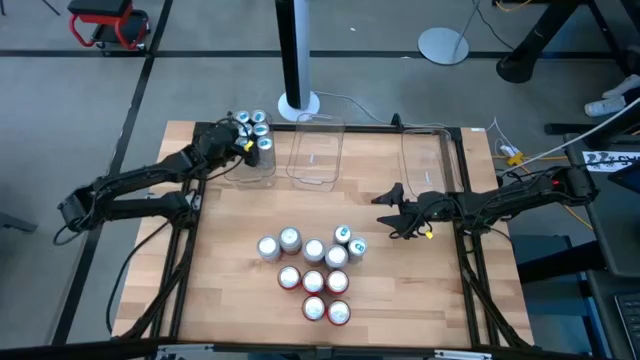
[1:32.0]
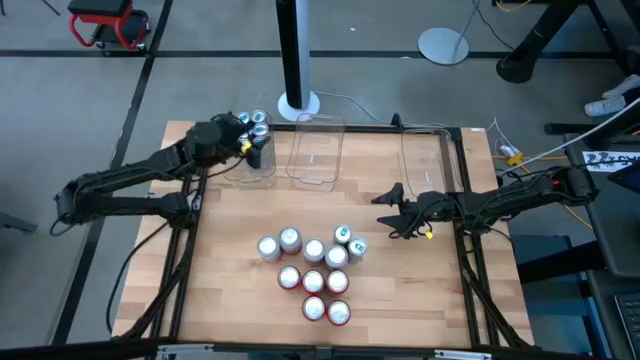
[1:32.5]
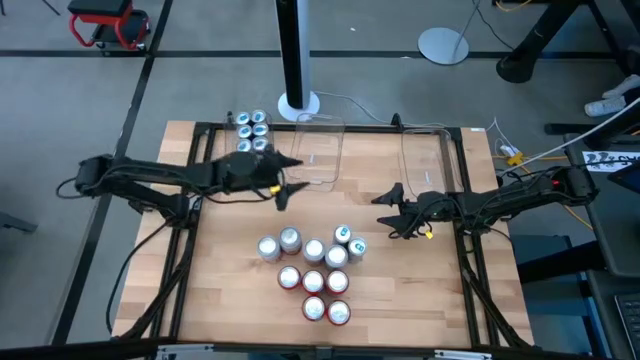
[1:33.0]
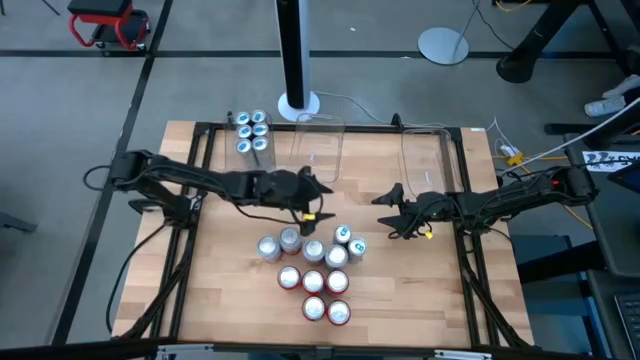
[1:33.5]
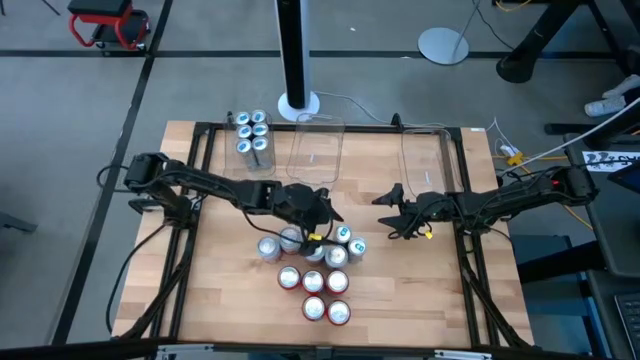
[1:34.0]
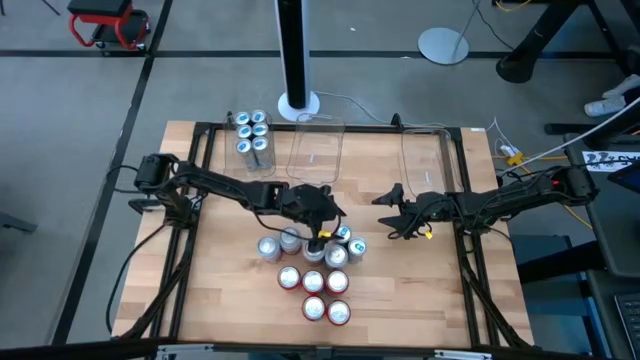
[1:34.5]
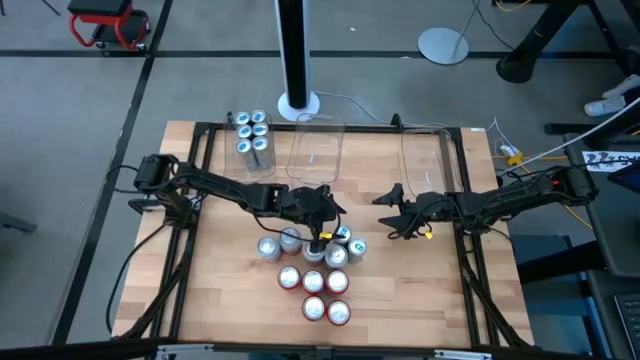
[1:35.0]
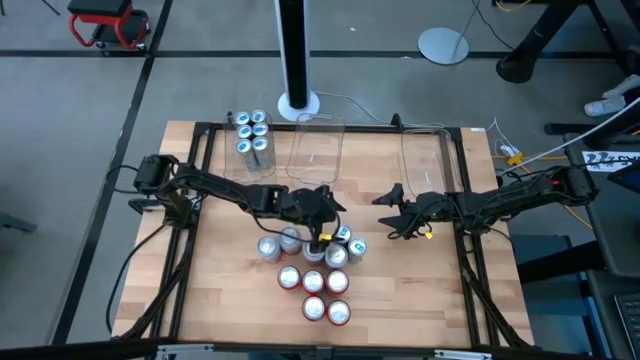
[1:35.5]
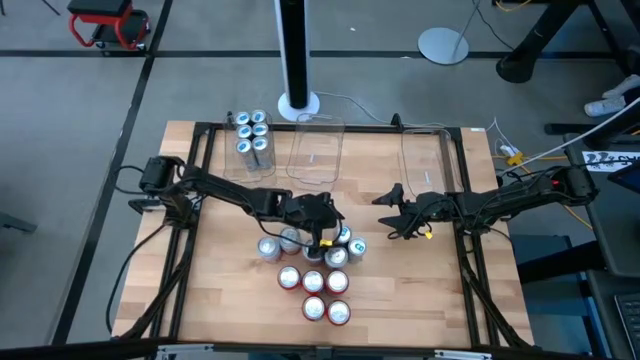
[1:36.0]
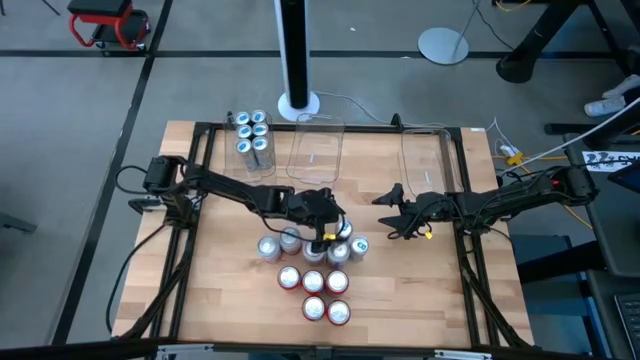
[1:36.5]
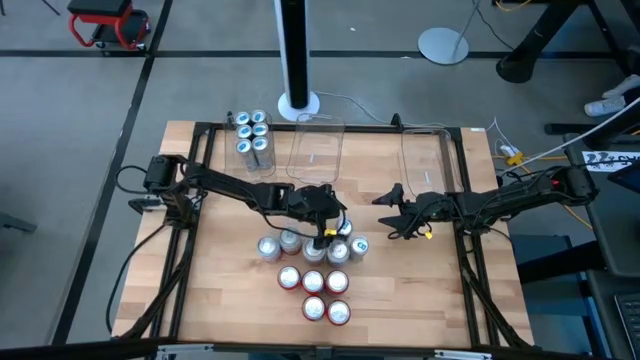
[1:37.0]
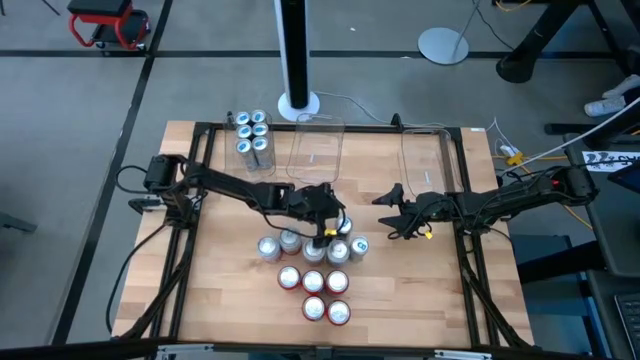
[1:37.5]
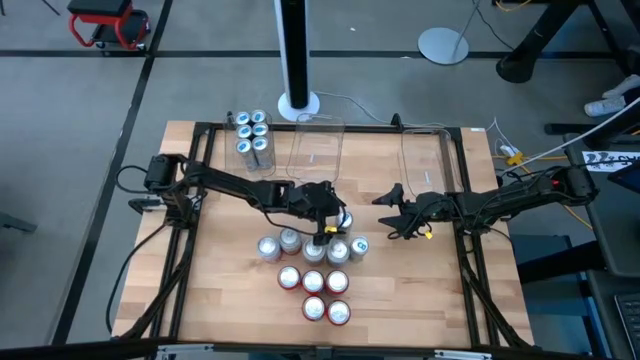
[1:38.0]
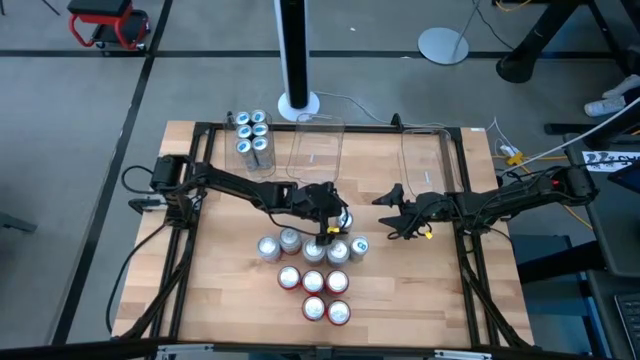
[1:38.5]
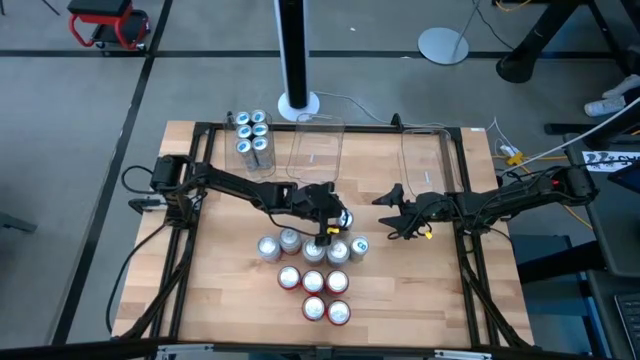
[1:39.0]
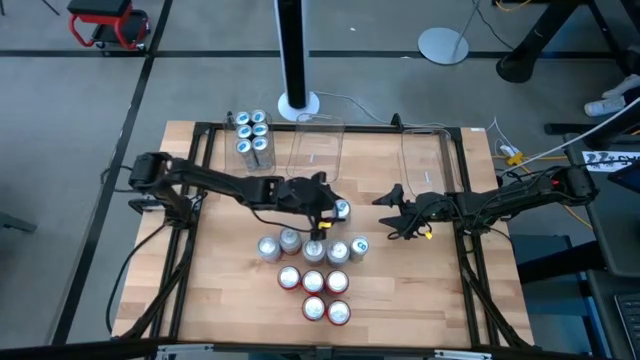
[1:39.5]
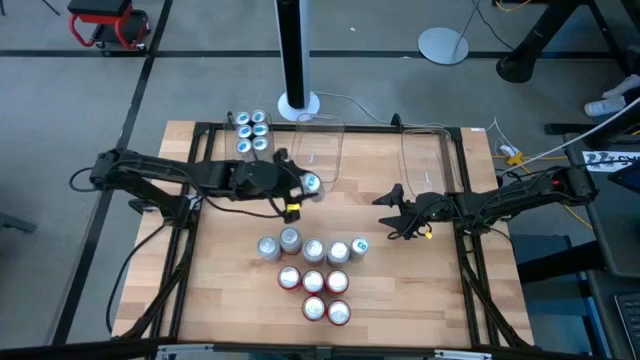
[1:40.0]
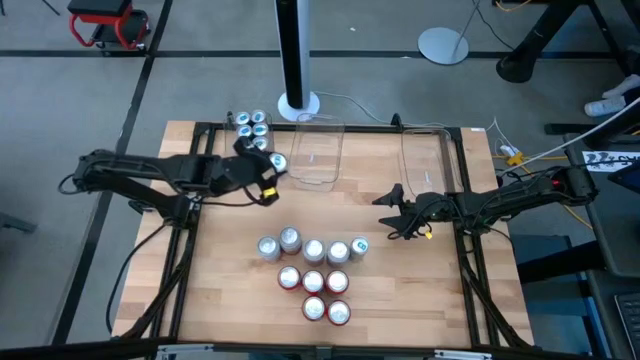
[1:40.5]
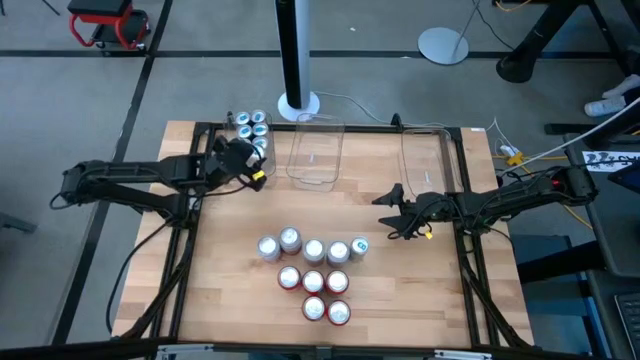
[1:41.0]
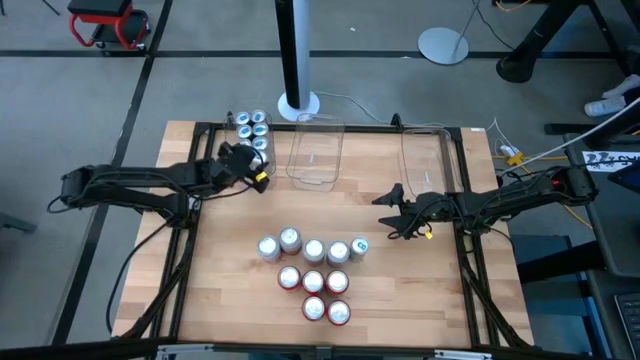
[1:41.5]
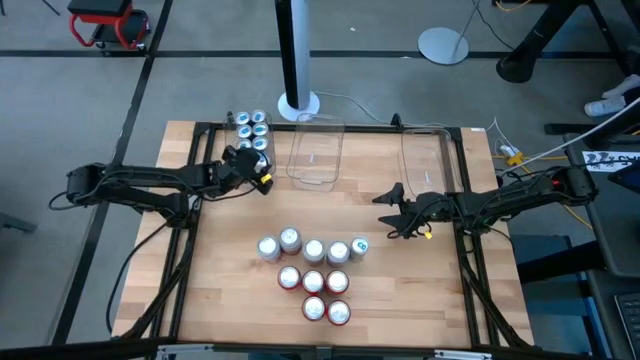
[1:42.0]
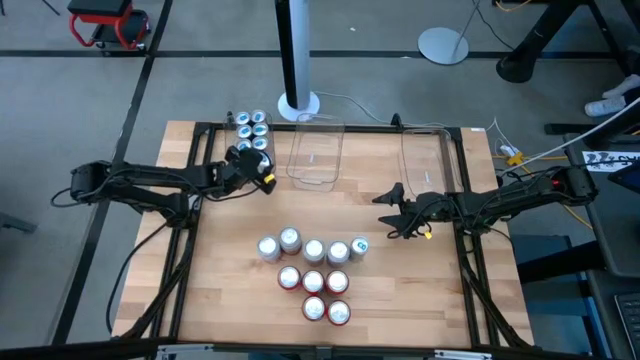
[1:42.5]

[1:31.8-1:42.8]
Task: Sort soda cans
Put the blue soda can into the left transparent bin

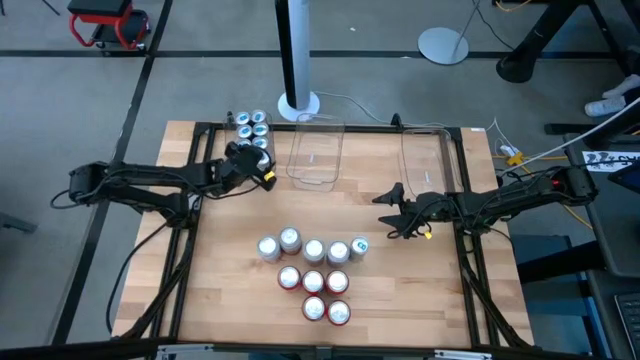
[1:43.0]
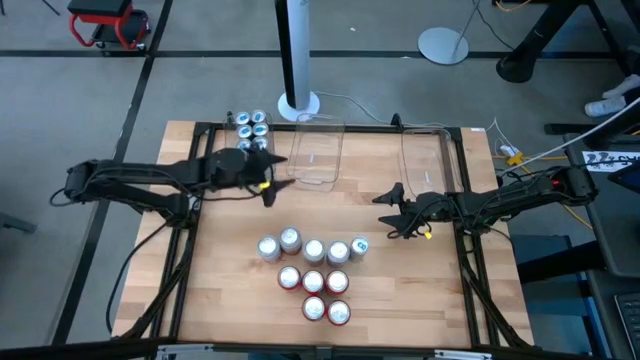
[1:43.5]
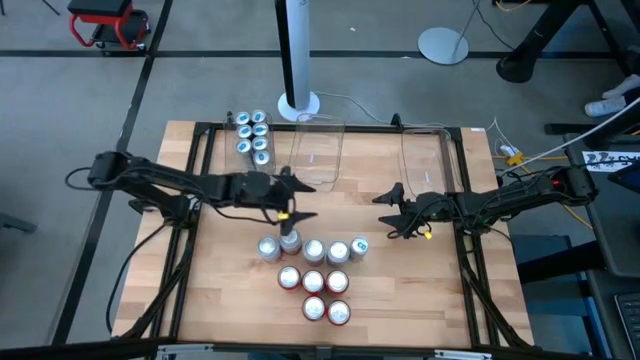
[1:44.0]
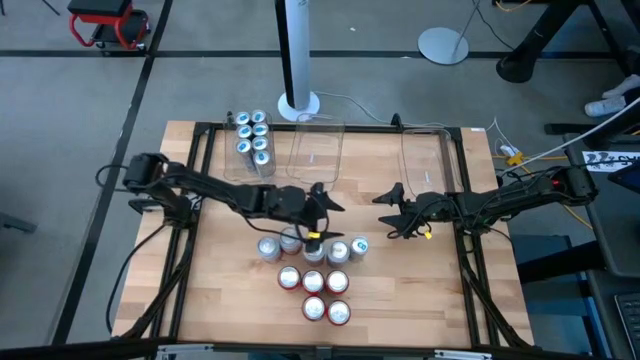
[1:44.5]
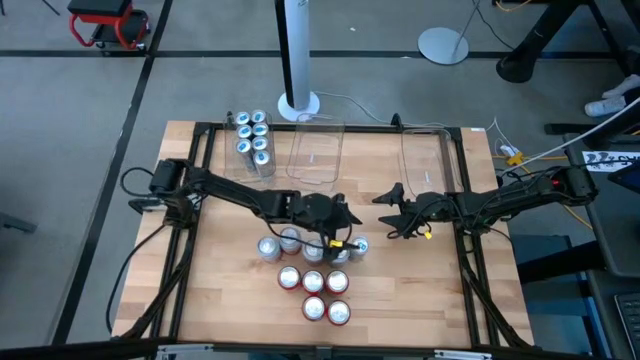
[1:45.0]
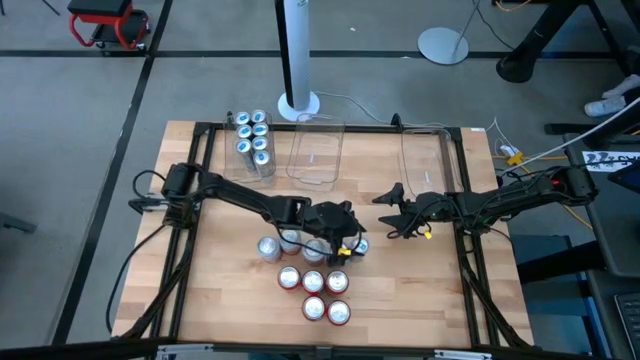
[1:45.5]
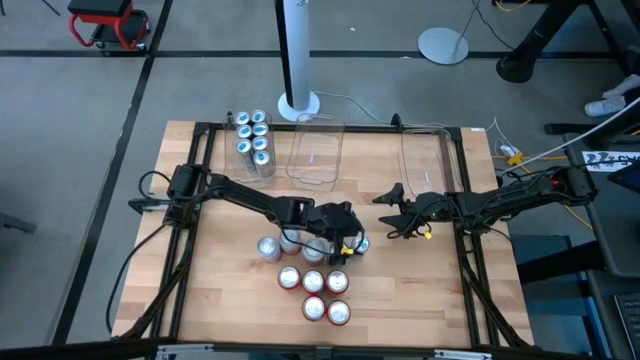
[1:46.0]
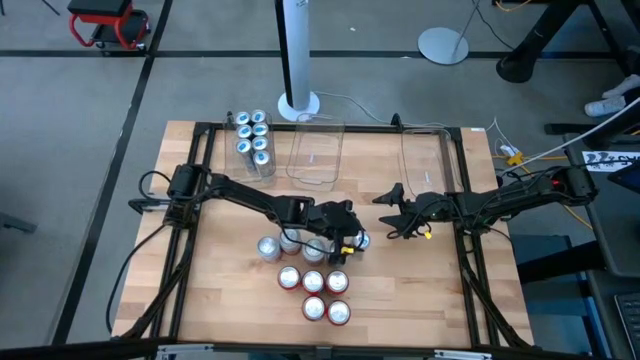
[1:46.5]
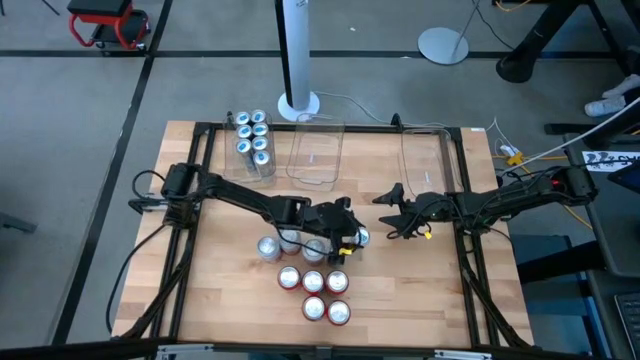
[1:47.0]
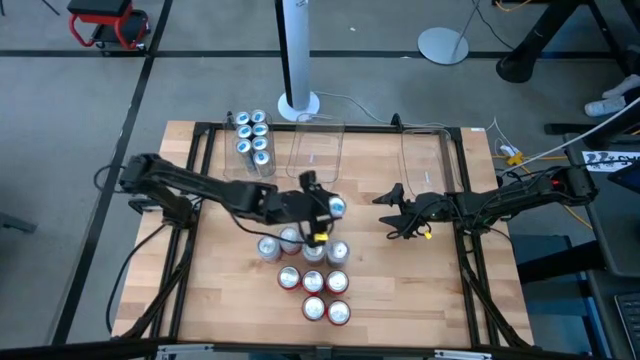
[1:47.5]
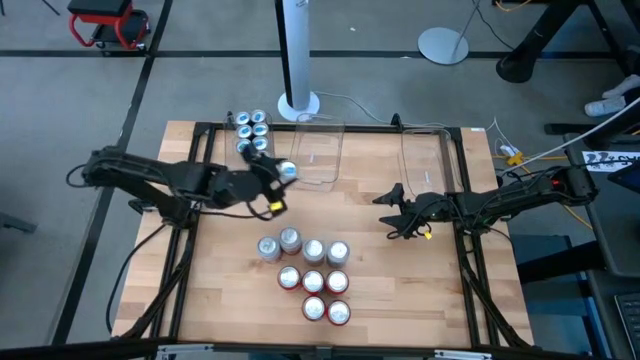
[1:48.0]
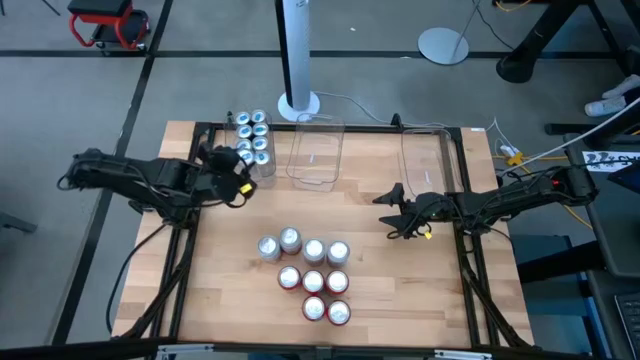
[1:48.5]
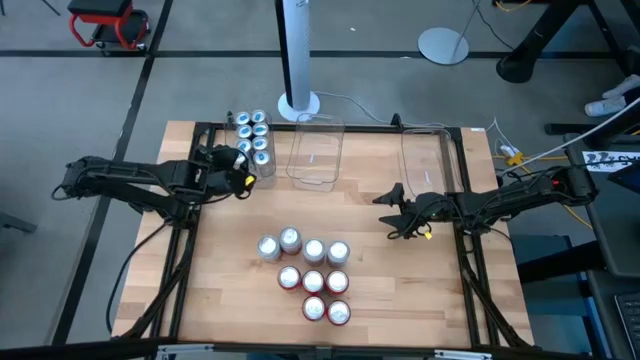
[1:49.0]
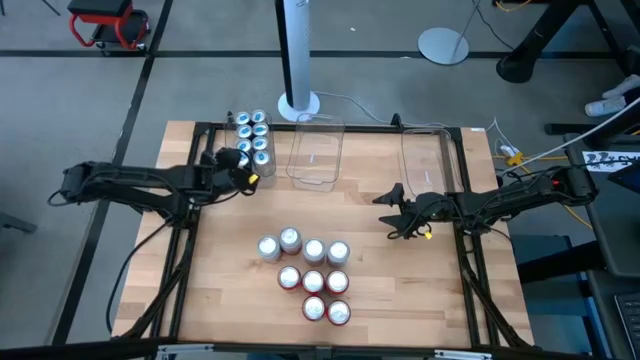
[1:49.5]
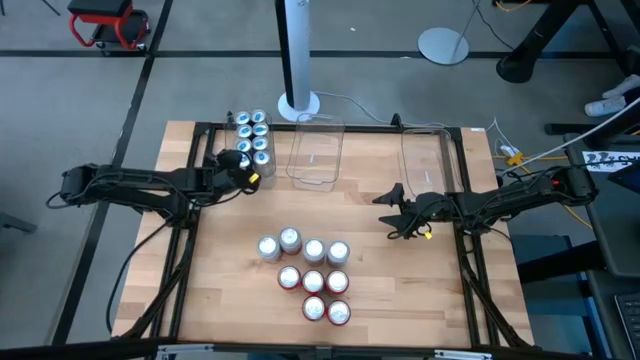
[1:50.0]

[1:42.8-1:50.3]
Put the blue soda can into the left transparent bin

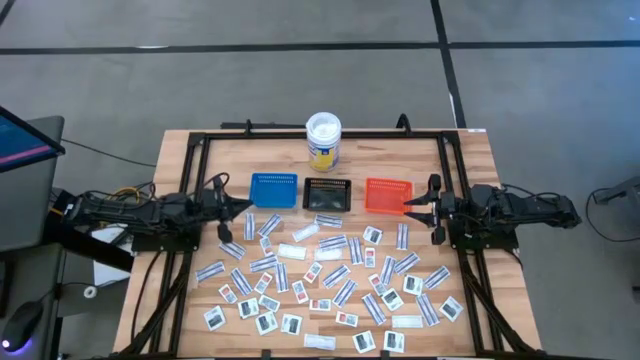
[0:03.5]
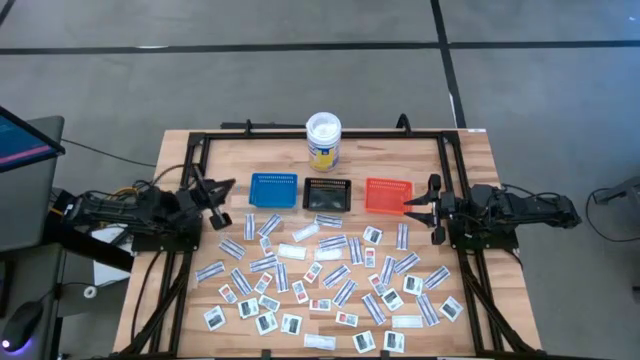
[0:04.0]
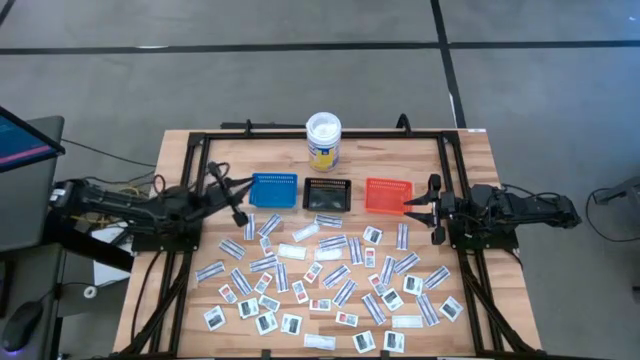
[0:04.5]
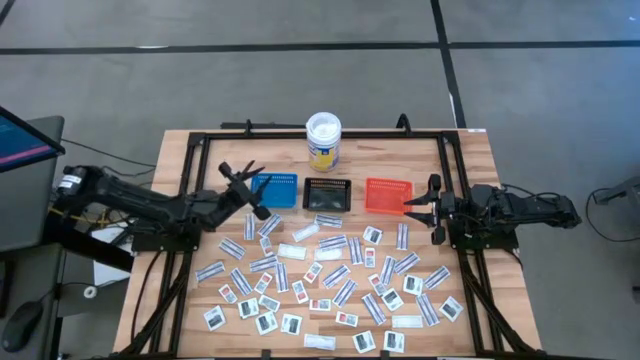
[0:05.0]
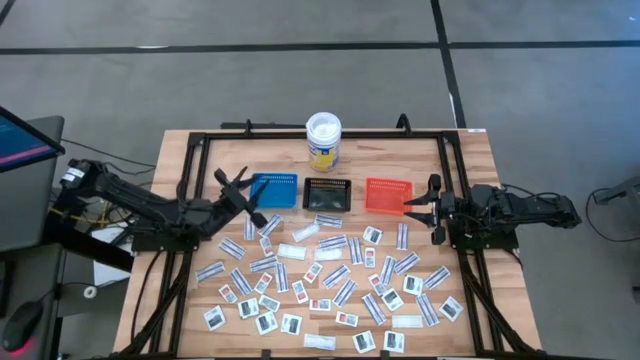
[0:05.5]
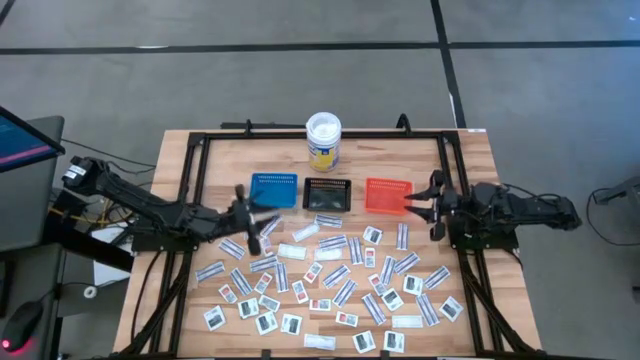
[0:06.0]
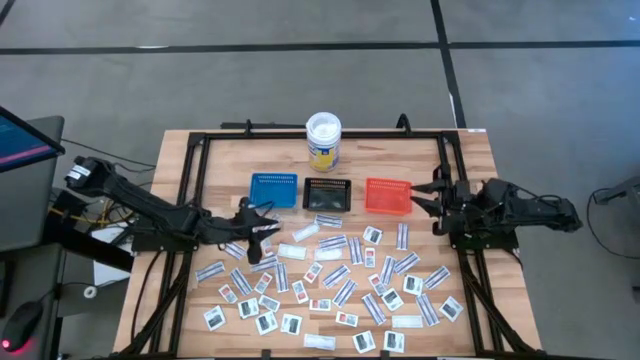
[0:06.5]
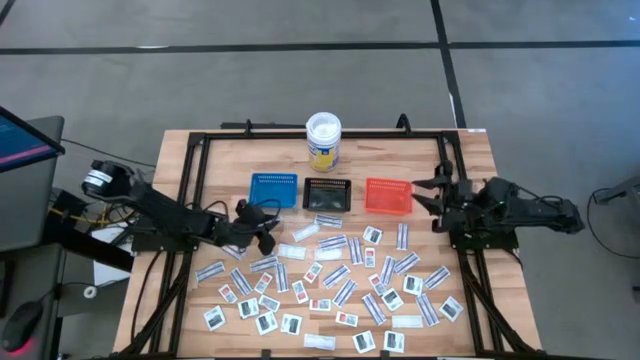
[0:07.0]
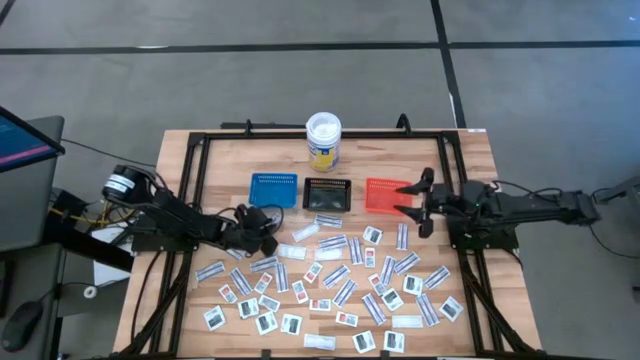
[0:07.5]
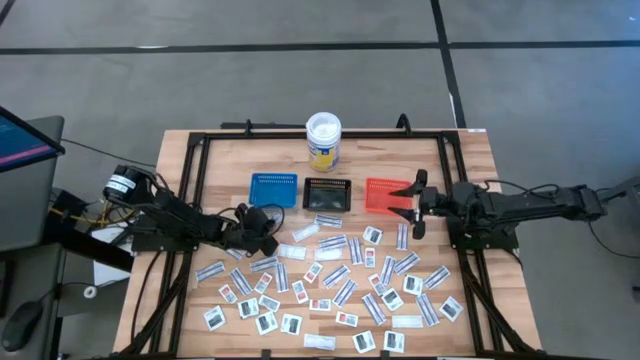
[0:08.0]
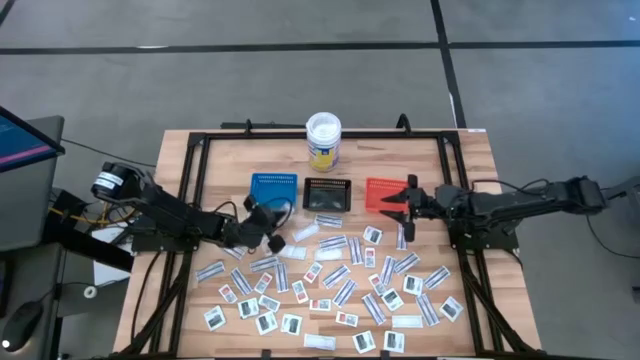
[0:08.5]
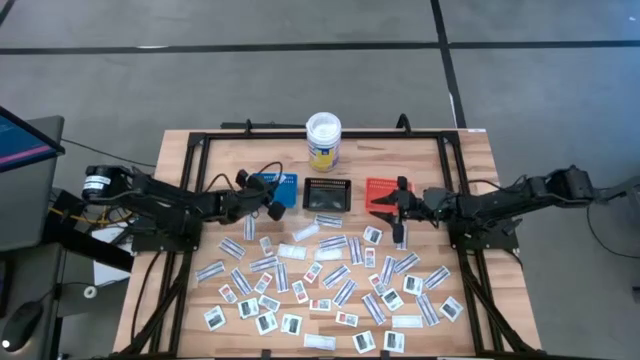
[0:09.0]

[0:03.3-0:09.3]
Task: Pick & Place First Aid Supplies
Put the blue bandage into the blue bin
